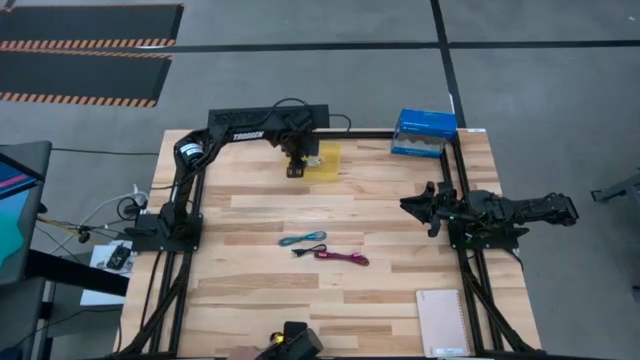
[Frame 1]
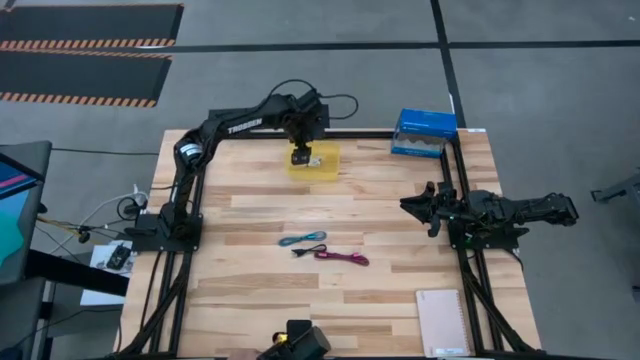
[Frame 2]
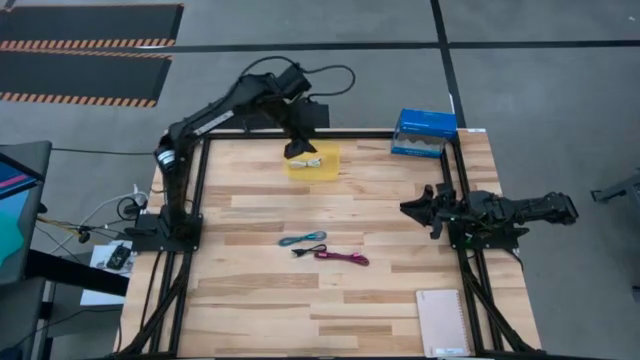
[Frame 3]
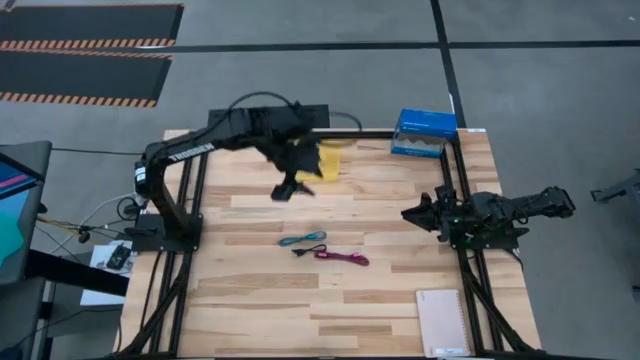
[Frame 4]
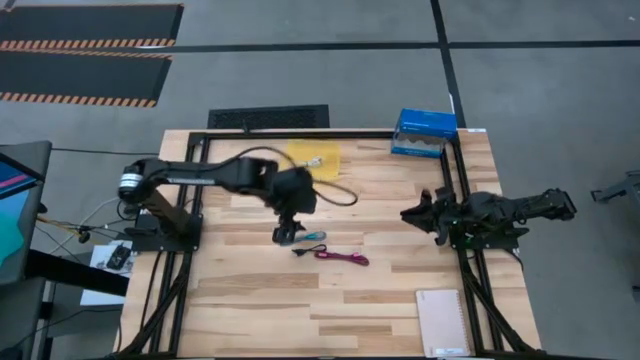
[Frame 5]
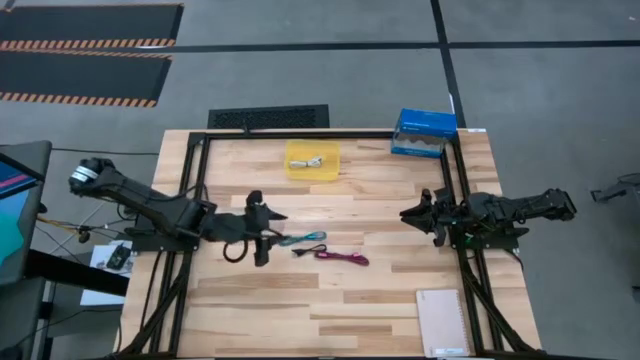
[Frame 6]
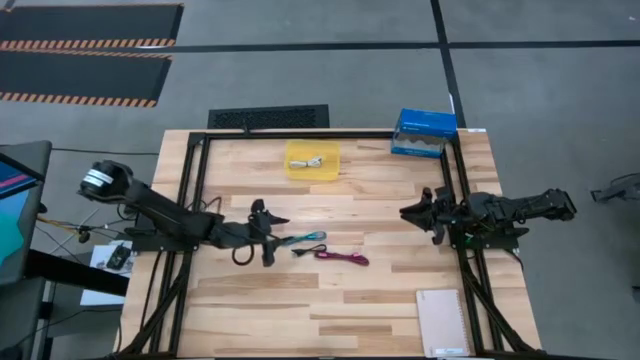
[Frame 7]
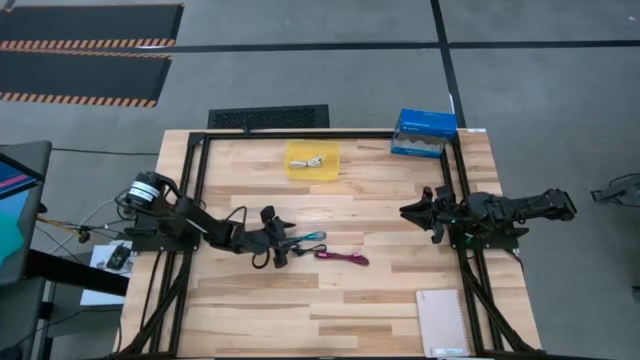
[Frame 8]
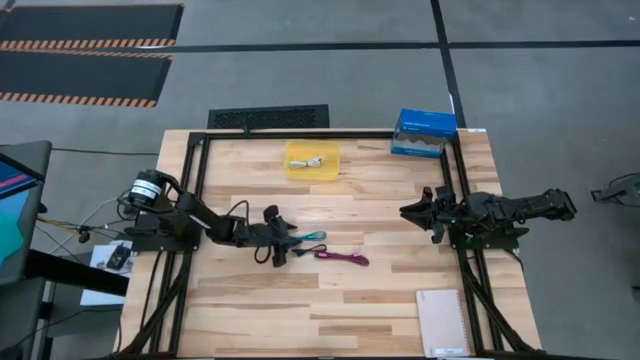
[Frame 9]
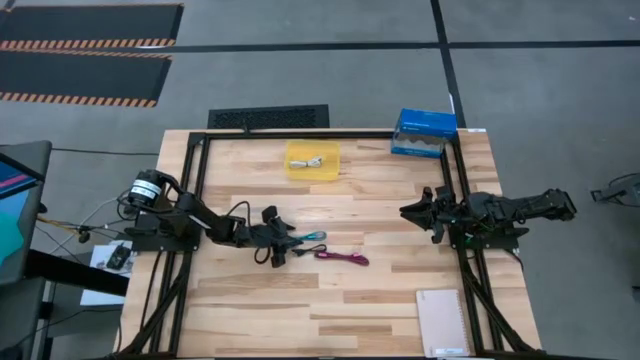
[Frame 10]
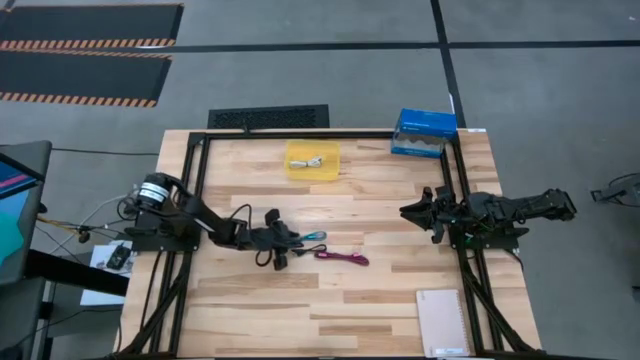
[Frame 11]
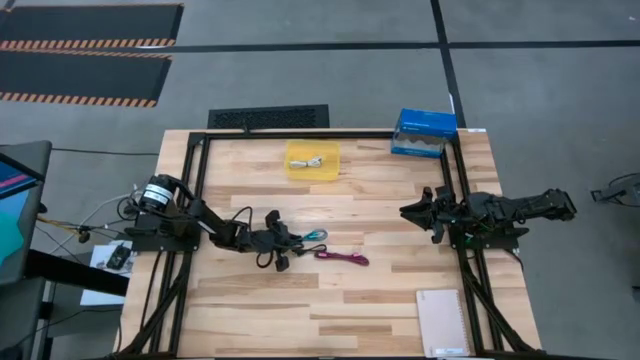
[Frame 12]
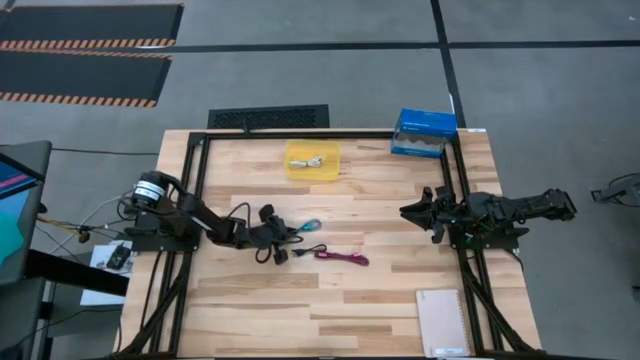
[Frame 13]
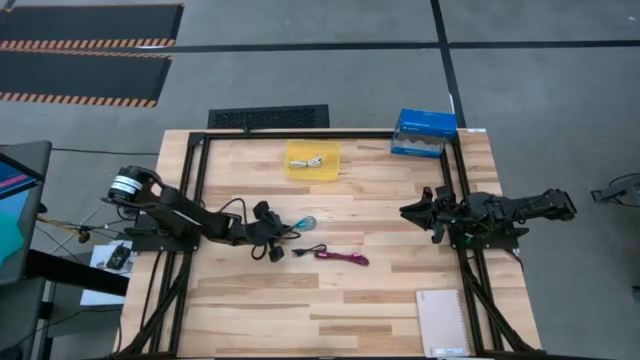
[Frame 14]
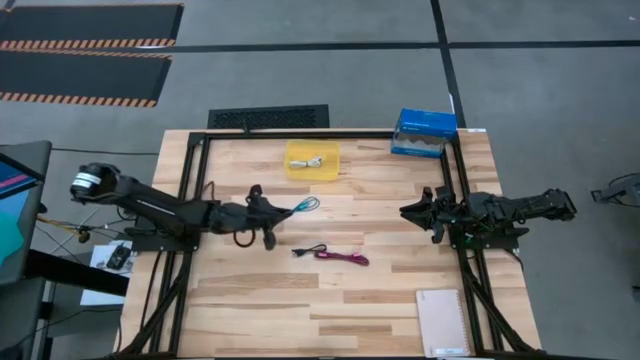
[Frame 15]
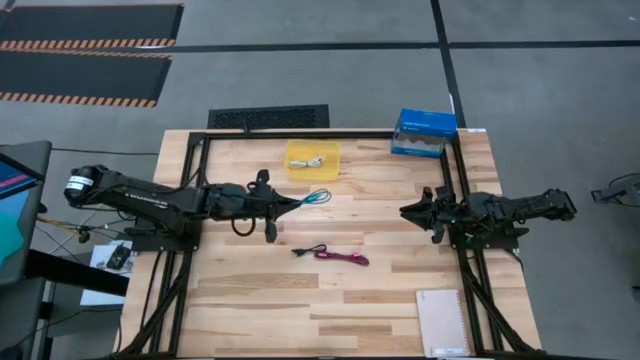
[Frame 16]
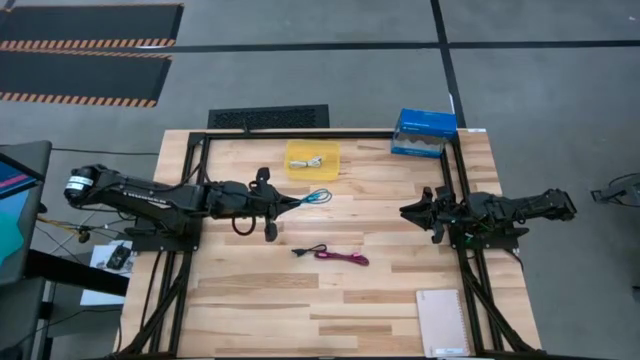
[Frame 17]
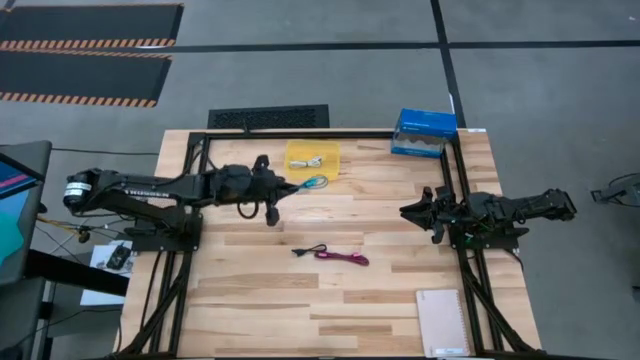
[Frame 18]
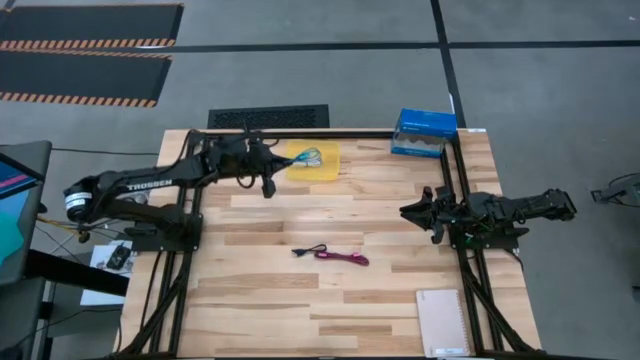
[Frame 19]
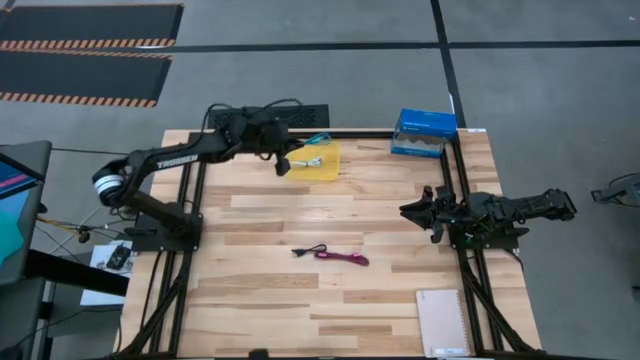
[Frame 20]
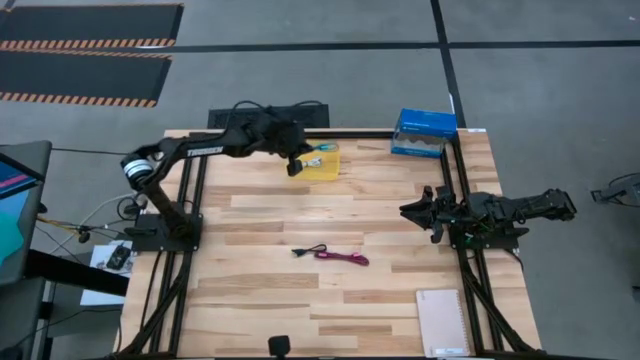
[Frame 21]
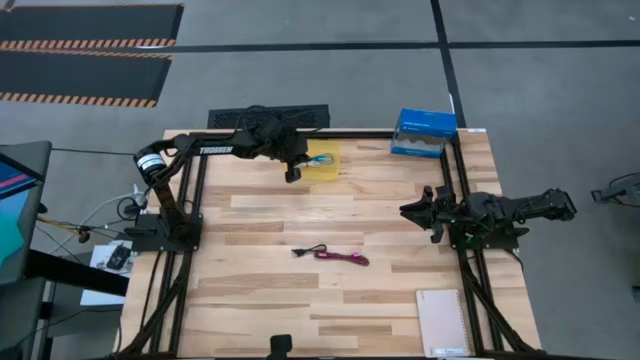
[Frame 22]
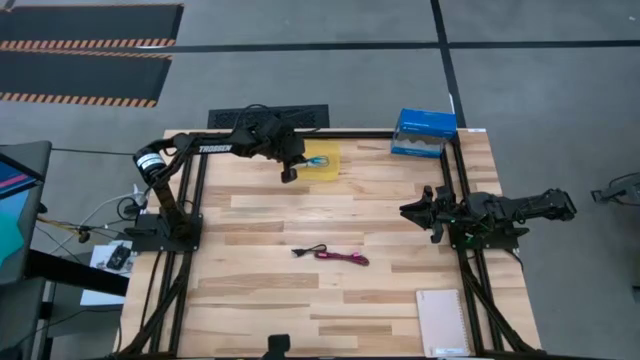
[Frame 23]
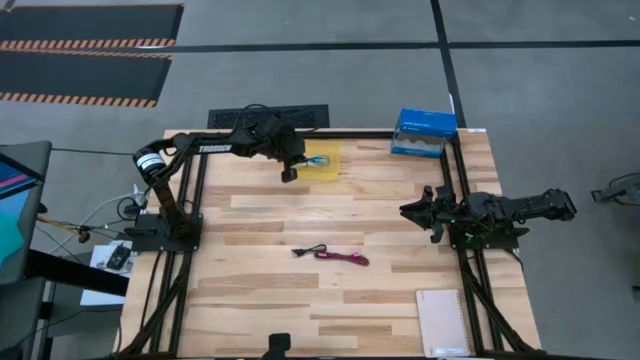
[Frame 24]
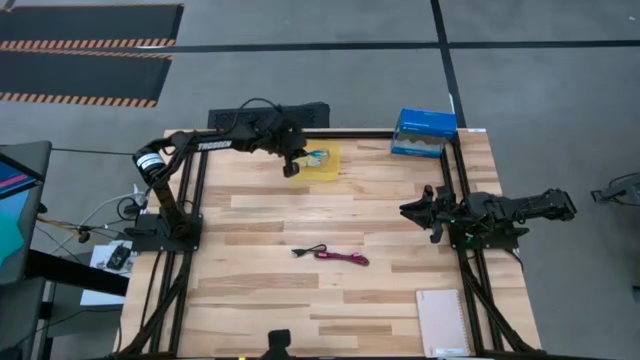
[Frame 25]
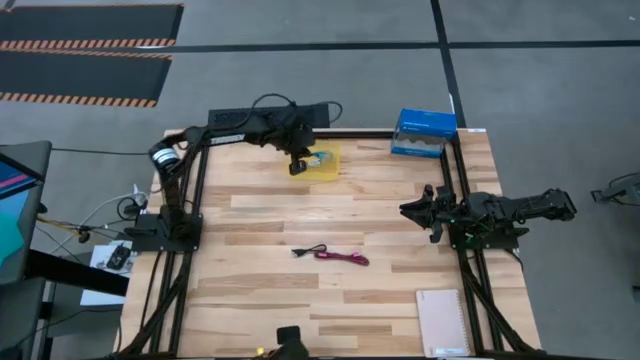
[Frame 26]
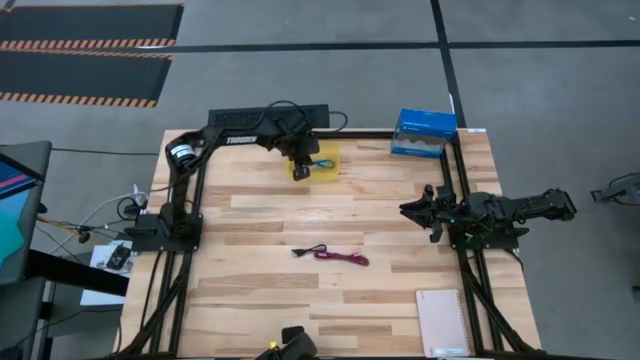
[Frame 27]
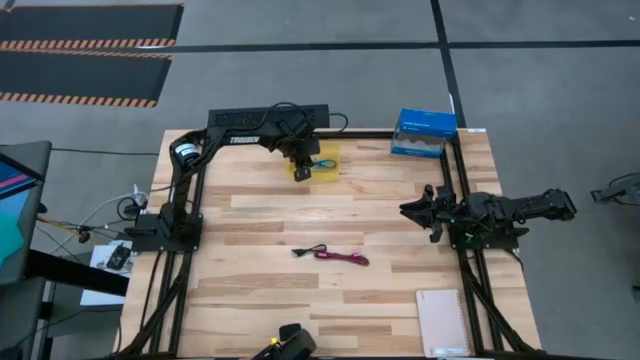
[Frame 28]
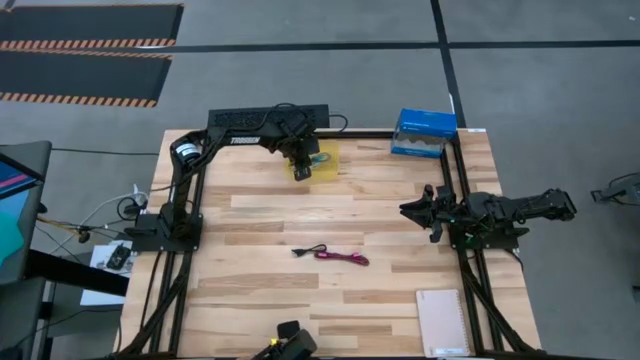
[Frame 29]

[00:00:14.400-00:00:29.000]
Task: Pick and place USB-C Cables
Put the blue charger cable into the yellow bin

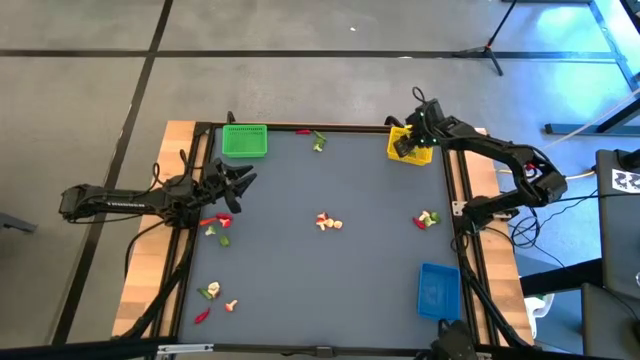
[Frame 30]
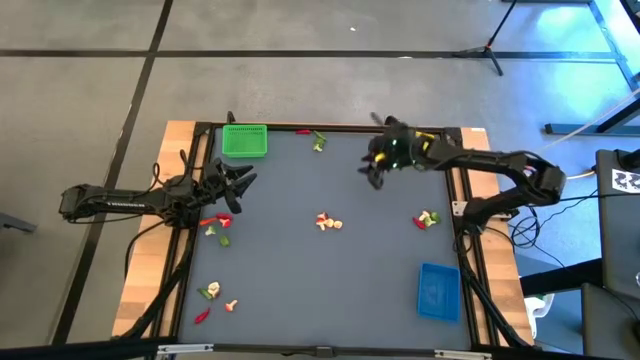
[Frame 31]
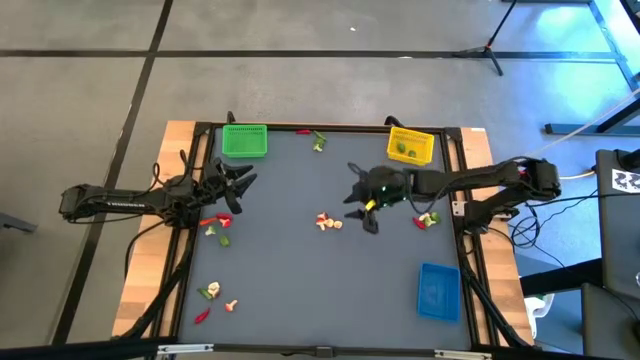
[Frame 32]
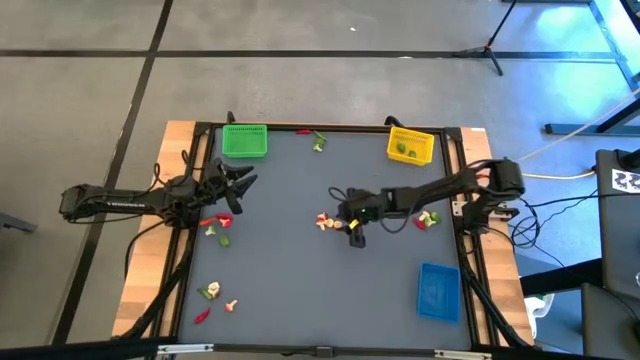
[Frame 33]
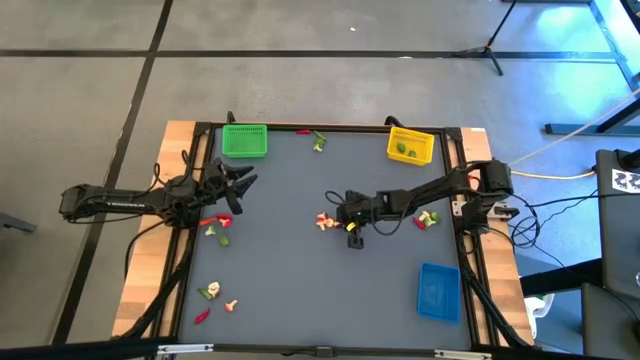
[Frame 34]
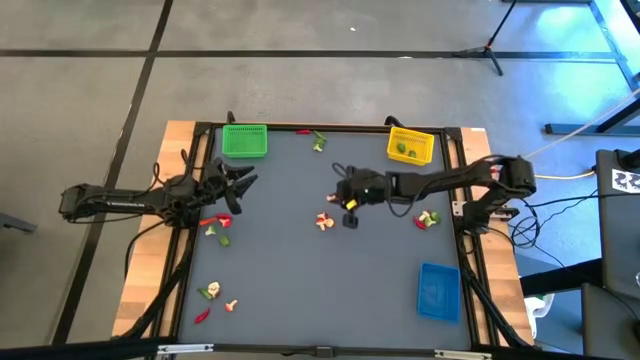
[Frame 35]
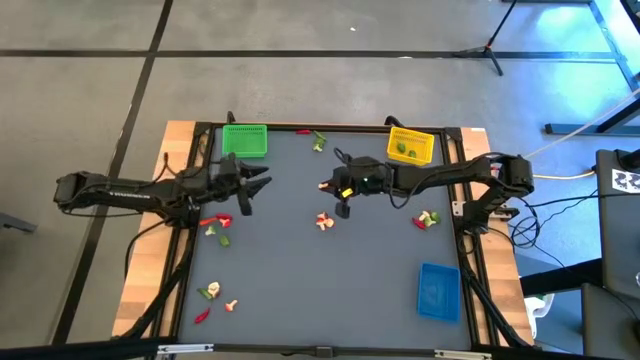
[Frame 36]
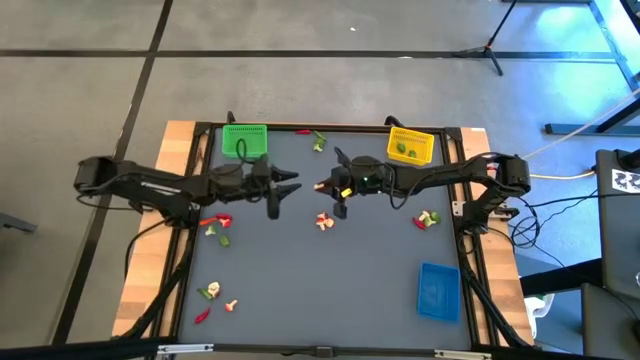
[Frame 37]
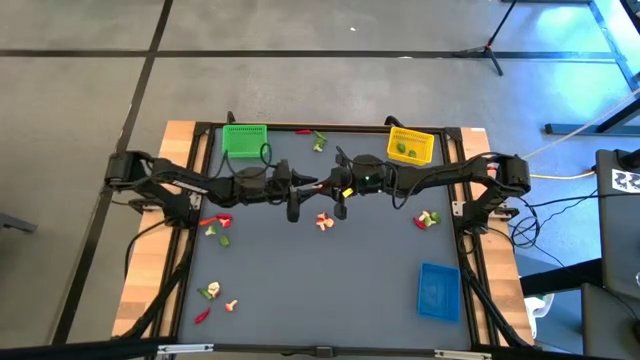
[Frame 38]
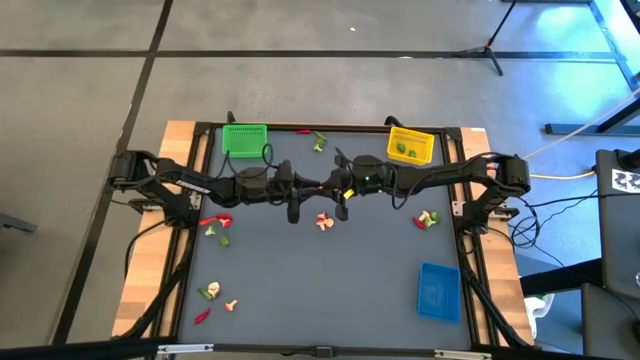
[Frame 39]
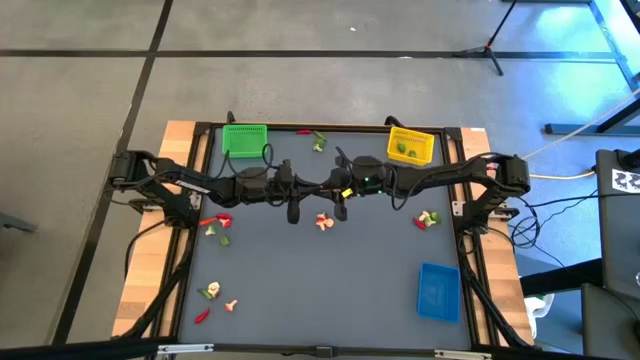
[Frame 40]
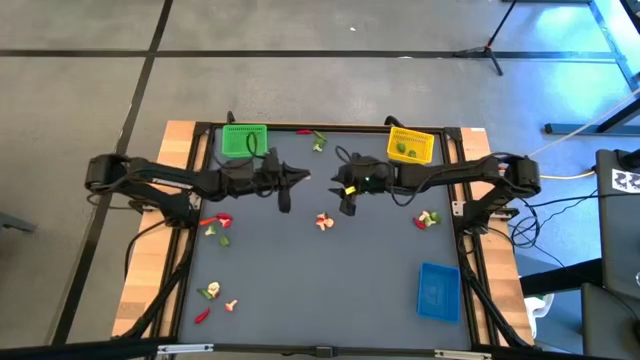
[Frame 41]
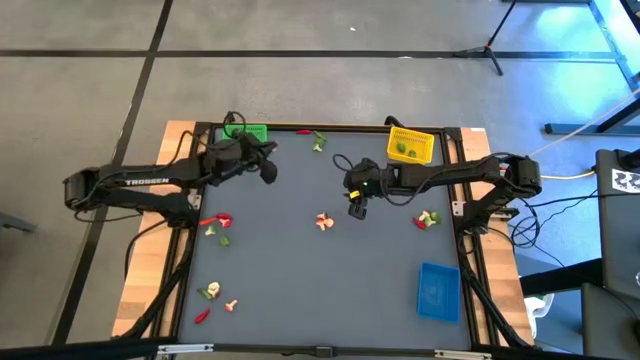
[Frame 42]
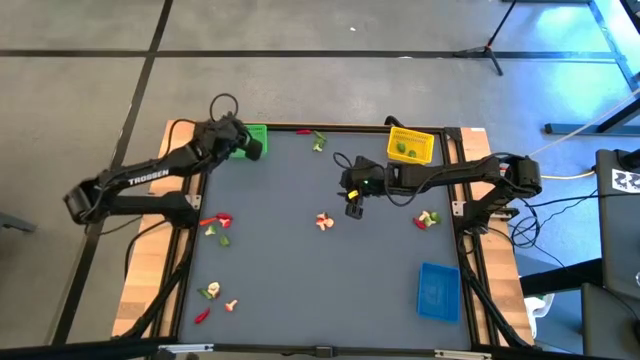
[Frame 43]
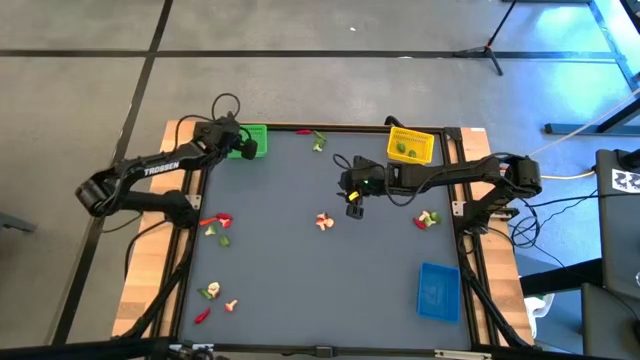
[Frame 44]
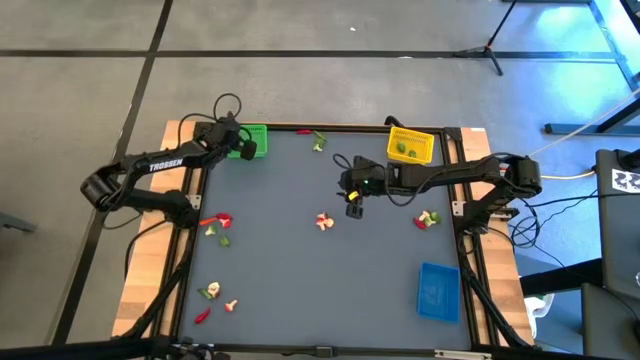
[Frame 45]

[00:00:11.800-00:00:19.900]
Task: Sort produce into baskets
Put the red mushroom into the green bin
